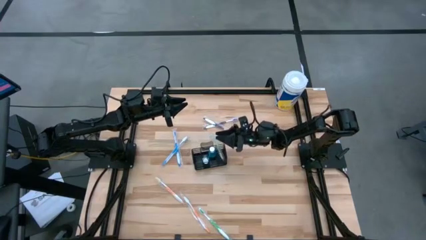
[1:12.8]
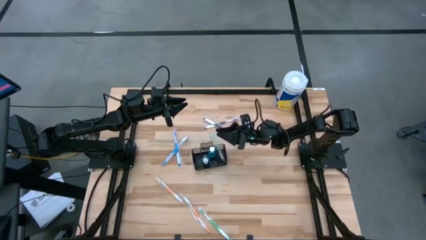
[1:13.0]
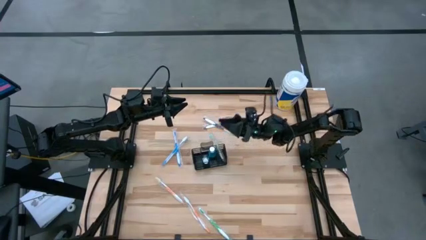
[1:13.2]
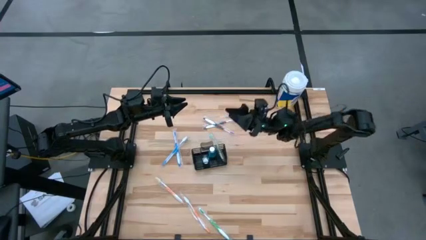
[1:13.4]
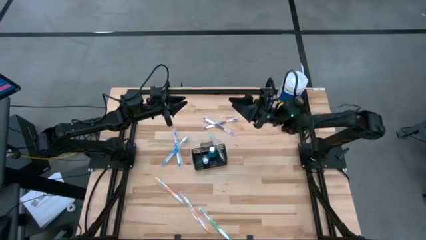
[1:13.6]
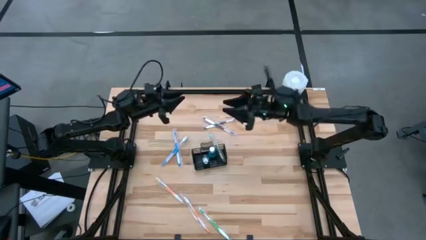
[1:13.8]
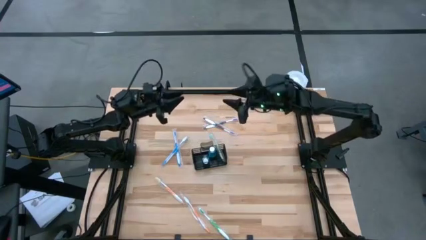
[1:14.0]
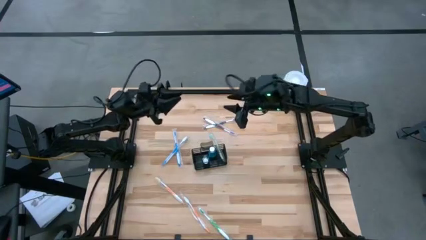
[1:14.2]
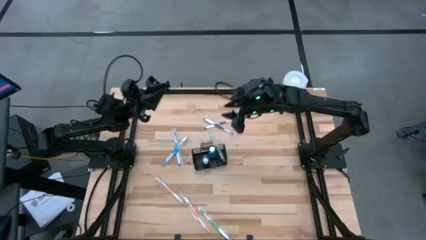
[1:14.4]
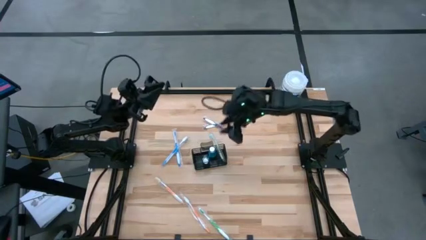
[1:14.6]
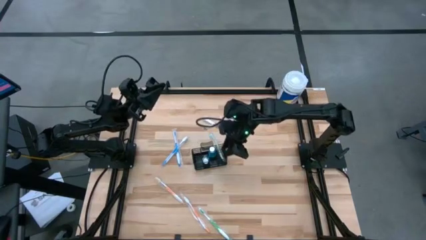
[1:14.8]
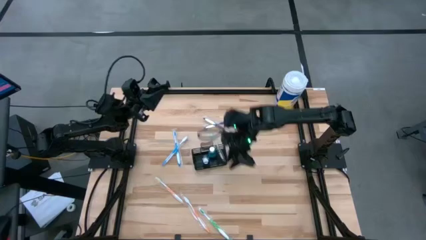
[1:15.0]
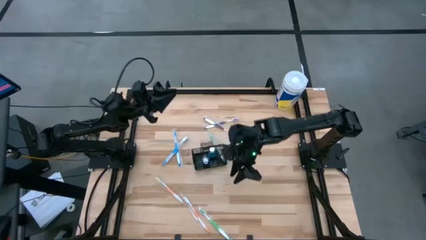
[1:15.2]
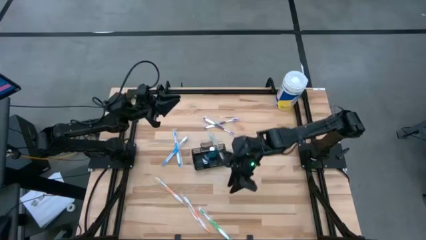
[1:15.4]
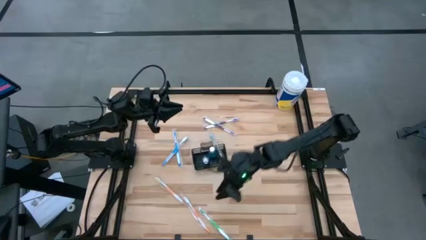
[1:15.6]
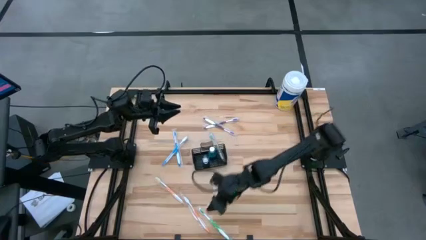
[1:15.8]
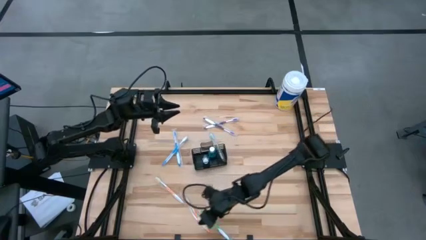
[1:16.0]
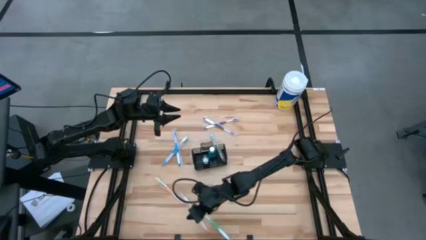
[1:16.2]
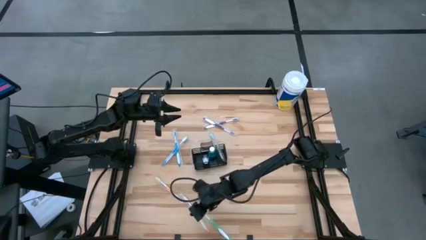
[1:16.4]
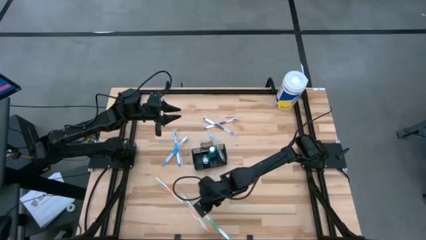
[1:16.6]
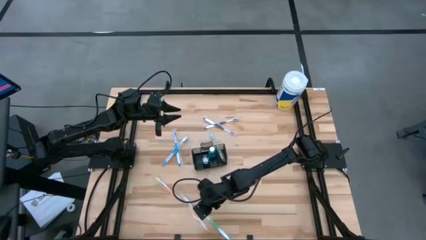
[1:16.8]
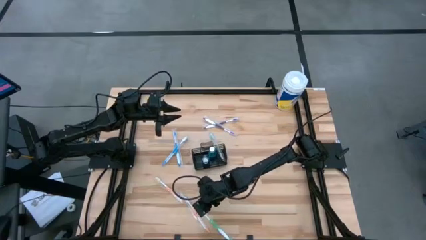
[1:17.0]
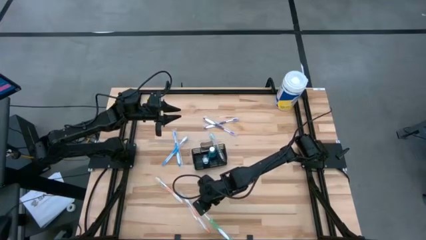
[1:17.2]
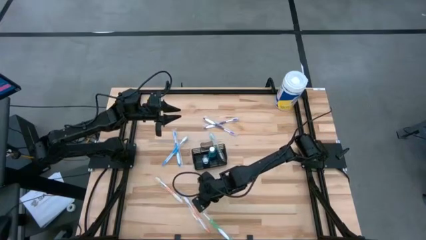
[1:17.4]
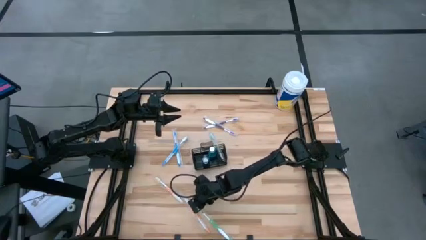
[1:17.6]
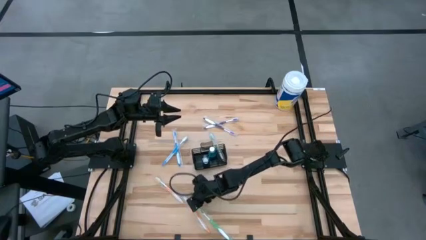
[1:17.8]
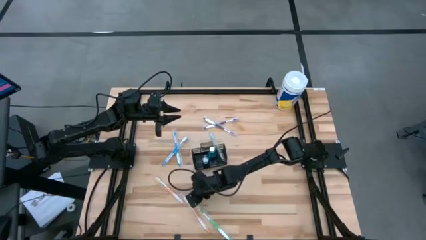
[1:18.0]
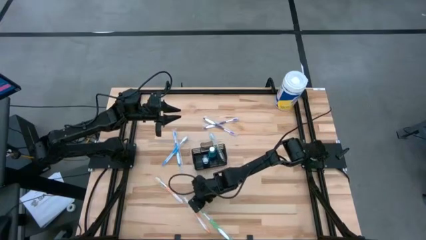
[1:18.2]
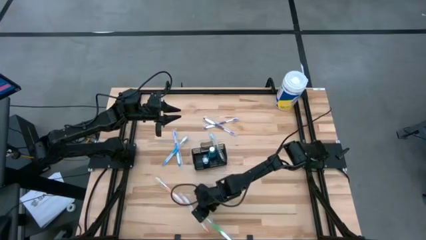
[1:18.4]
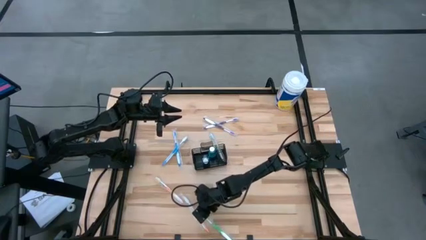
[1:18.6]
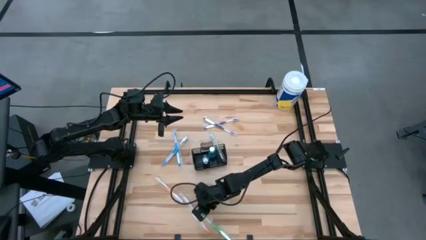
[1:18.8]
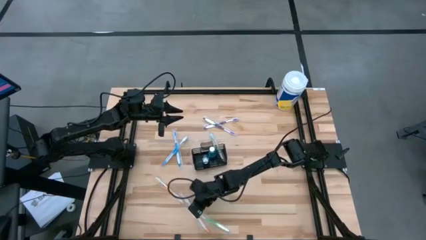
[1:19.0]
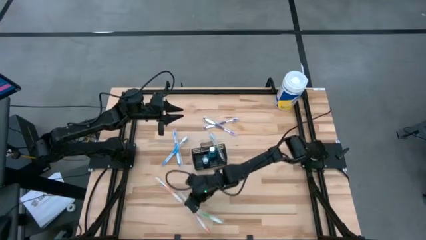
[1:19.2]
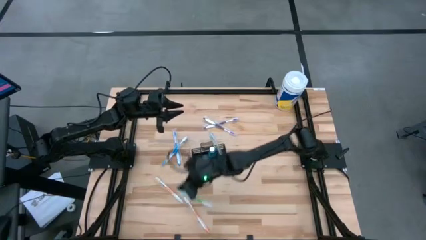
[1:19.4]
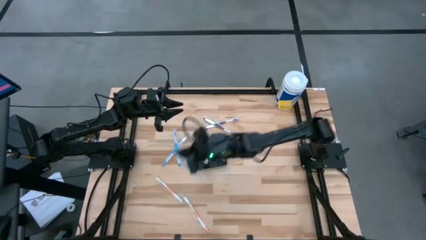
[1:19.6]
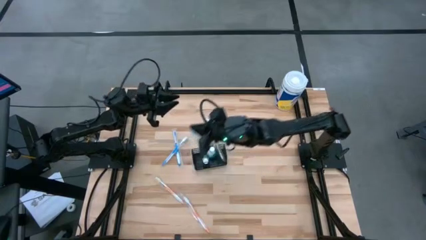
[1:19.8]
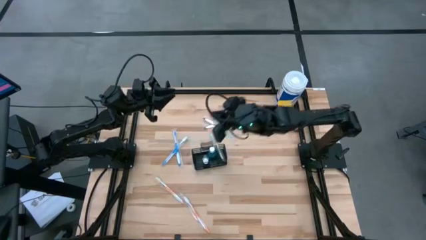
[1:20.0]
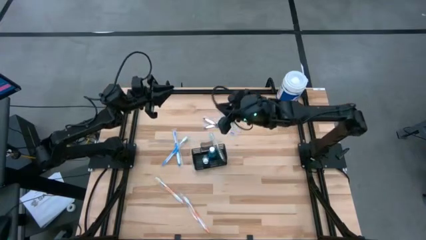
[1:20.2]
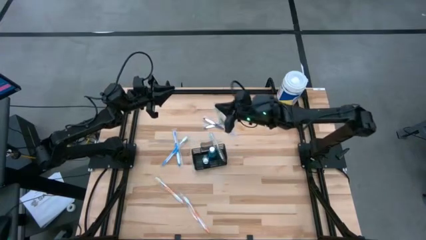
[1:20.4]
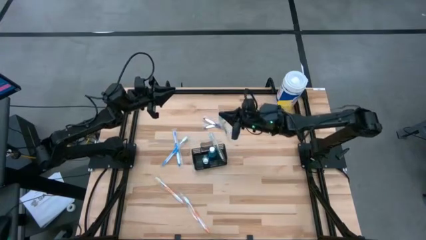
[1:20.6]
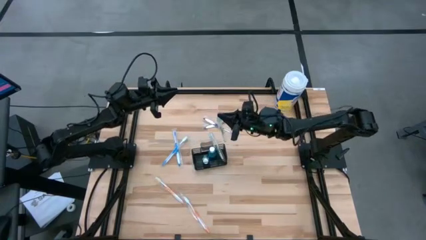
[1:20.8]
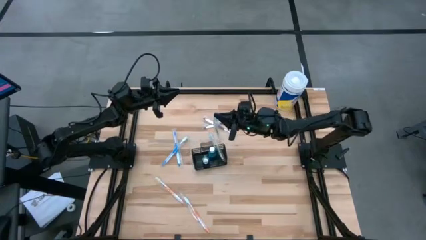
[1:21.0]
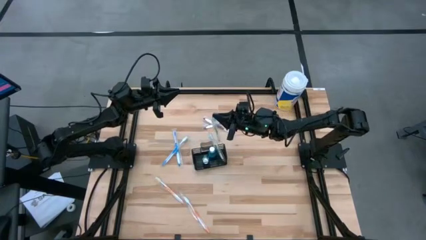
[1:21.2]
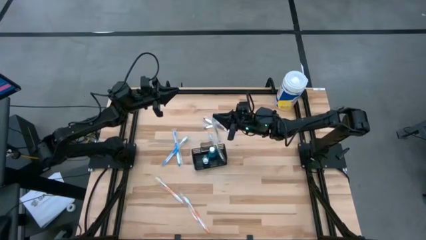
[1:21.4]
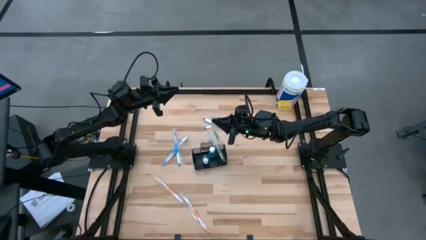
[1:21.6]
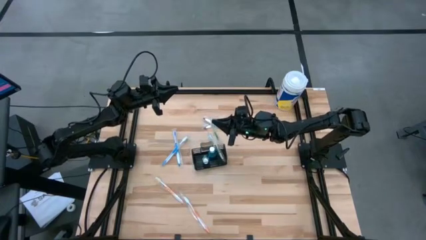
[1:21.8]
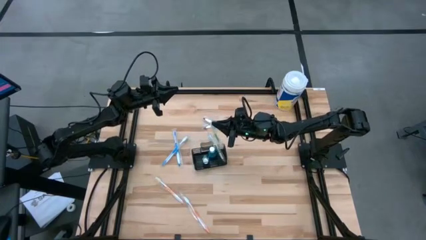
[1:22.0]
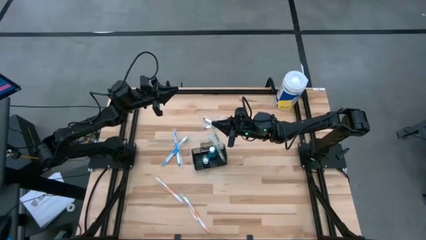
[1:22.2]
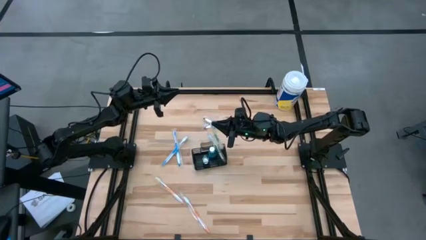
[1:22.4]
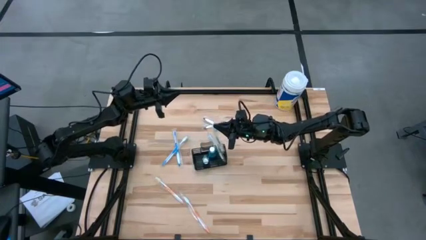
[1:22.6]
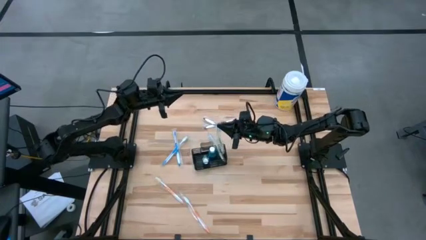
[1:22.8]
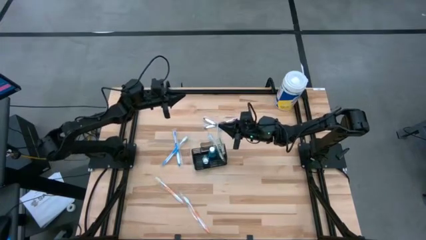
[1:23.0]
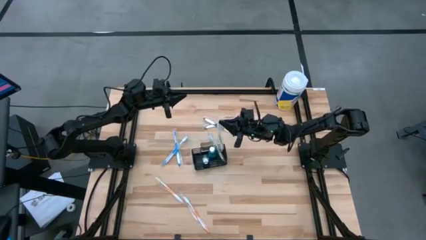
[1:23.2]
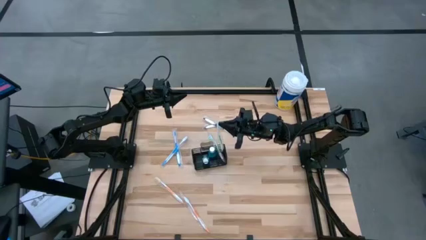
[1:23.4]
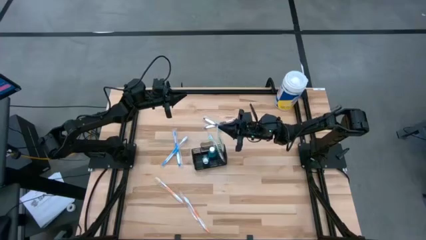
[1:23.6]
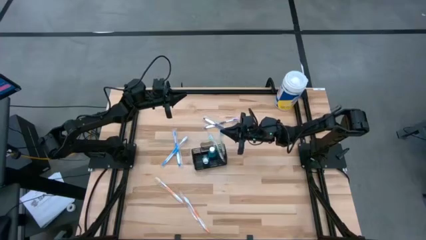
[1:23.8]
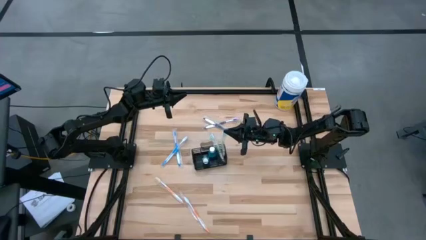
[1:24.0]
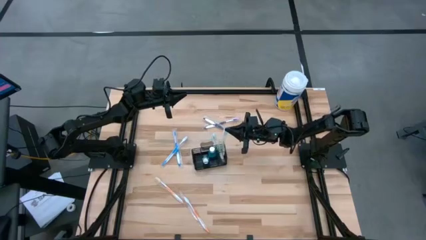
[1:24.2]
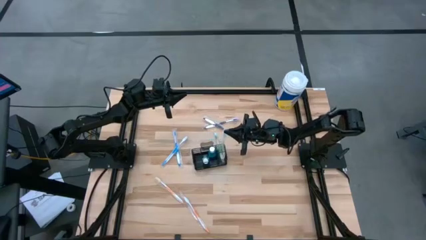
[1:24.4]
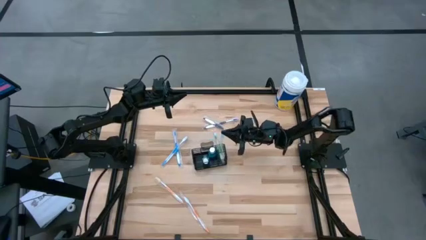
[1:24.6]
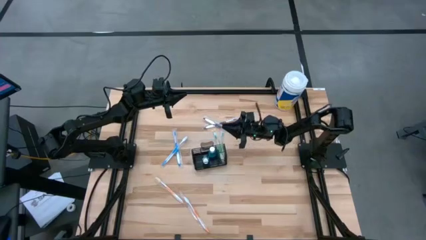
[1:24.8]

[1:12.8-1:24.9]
Task: Pick & Place toothbrushing station
Put the green toothbrush into the mesh organizer

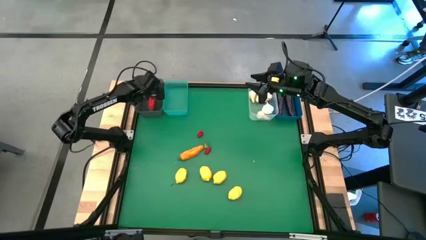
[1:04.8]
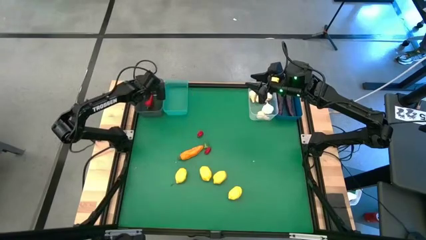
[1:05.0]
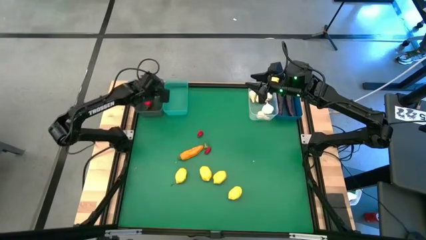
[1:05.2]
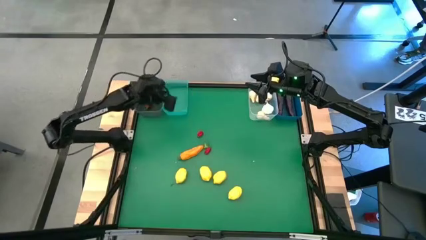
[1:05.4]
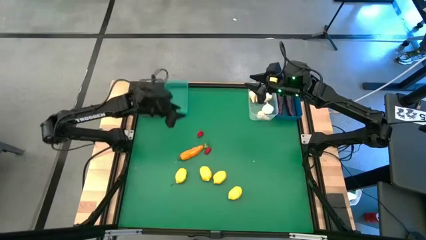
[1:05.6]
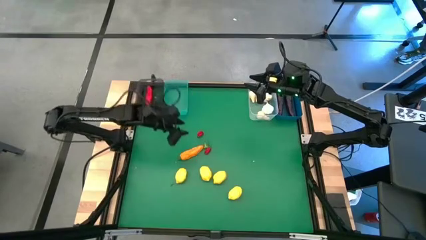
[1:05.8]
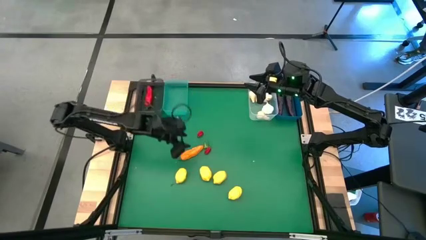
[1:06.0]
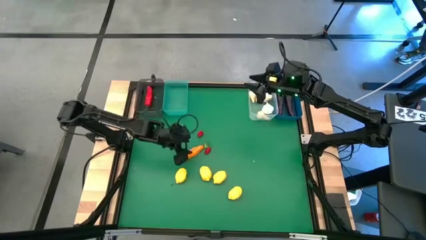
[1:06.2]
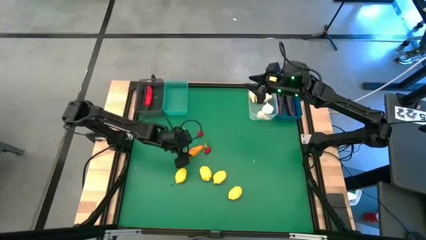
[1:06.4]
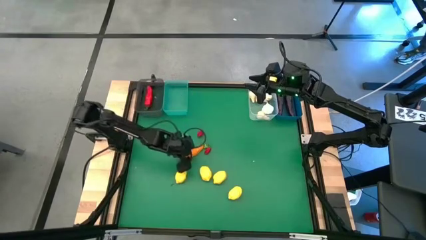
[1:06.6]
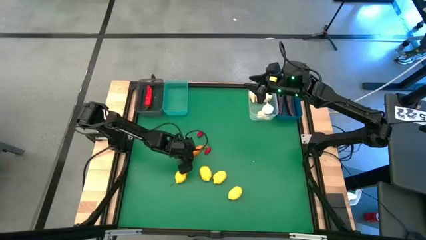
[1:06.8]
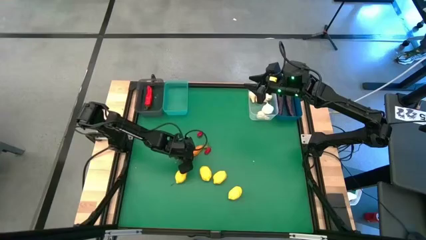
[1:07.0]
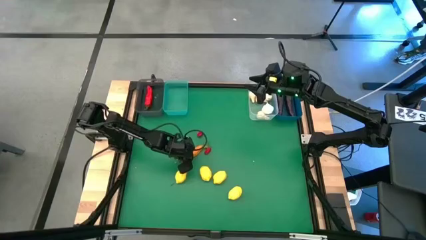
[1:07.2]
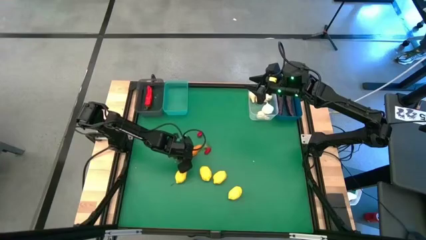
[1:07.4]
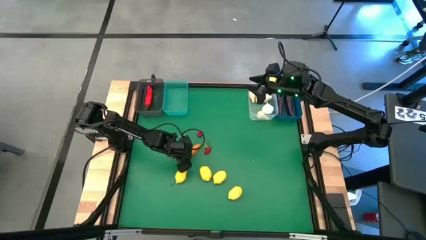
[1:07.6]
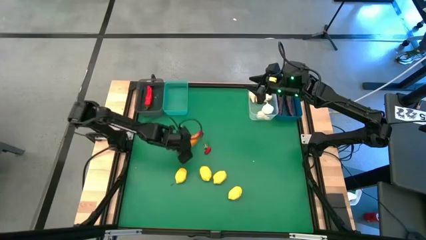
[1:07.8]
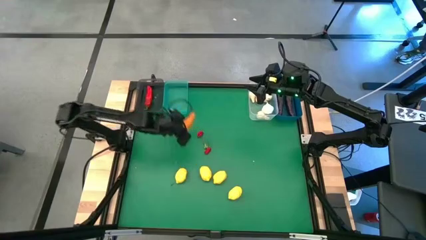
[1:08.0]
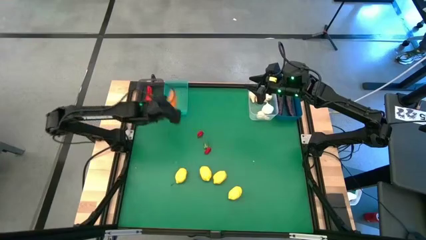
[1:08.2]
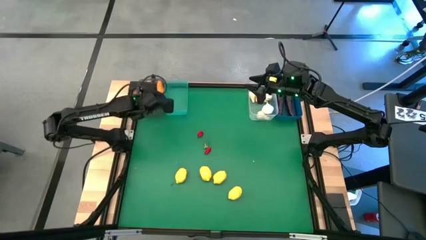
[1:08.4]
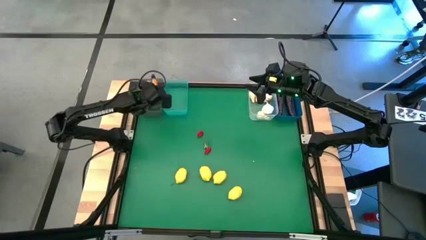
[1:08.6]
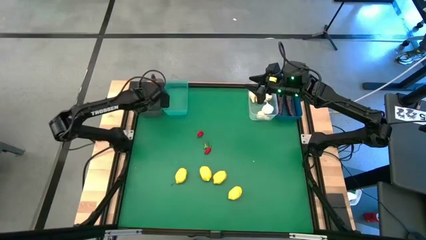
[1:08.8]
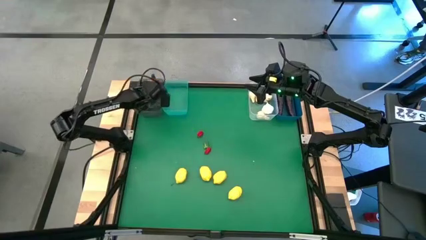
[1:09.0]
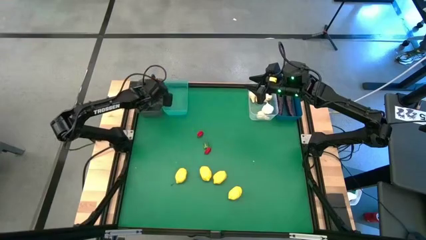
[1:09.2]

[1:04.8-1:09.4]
Task: Sort produce into baskets
Put the orange chilli pepper into the black bin
